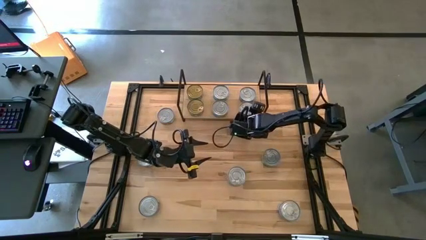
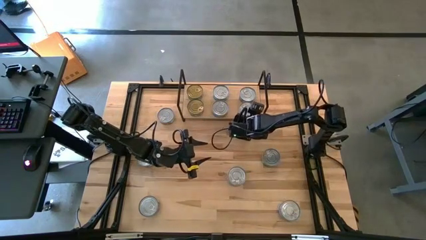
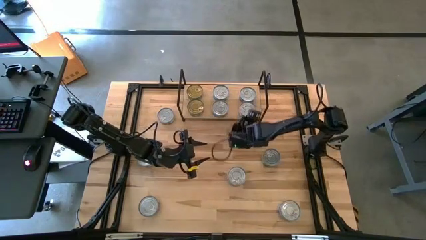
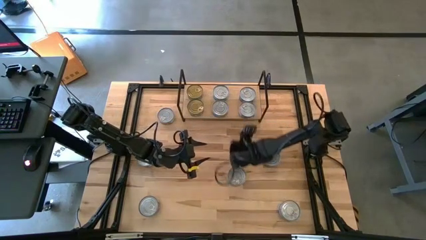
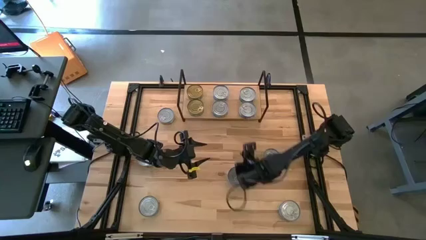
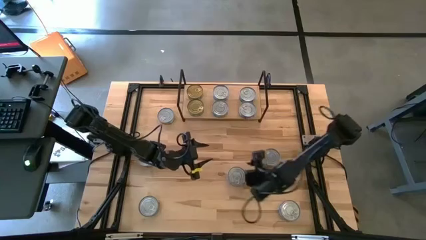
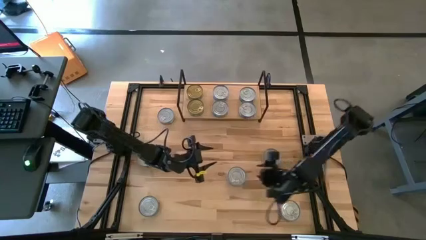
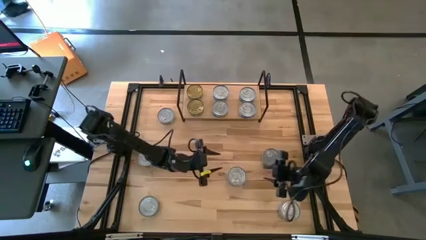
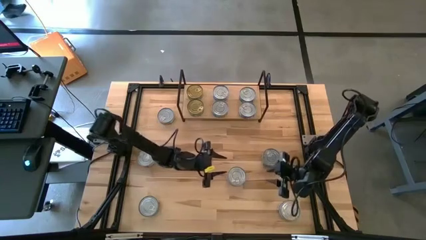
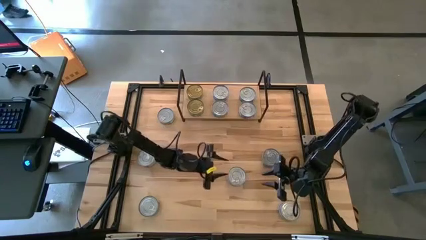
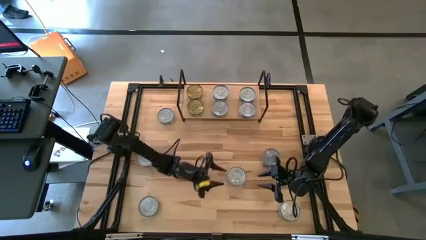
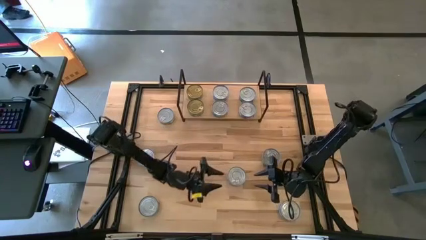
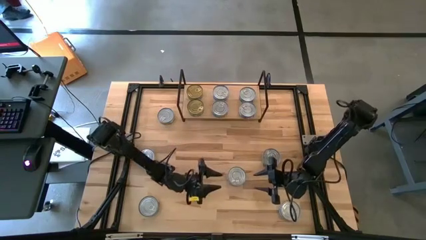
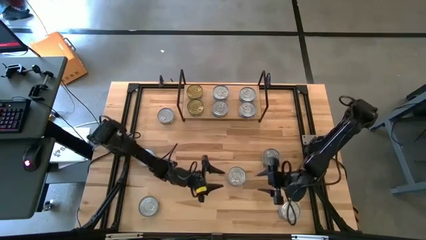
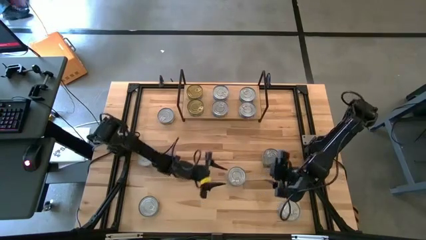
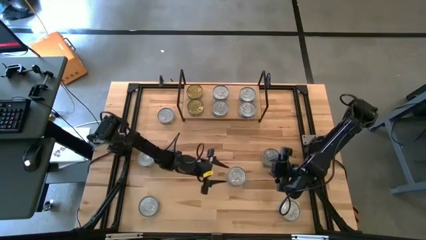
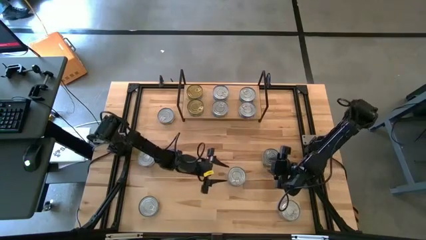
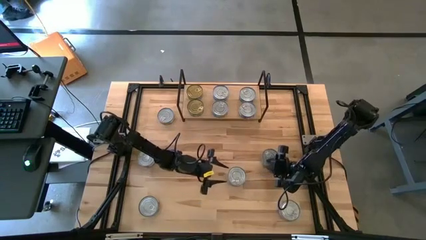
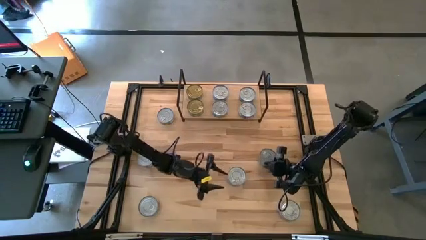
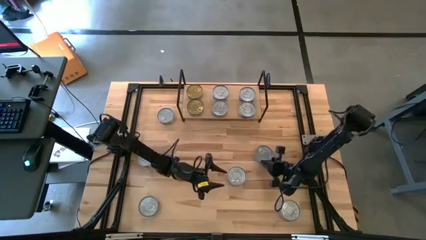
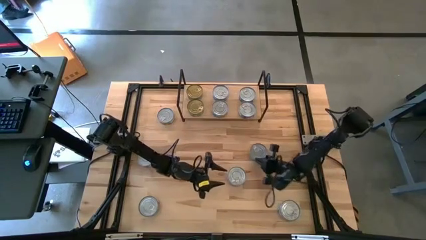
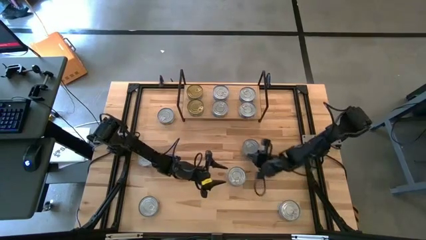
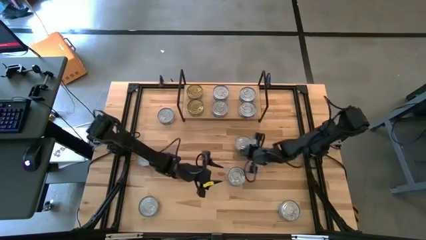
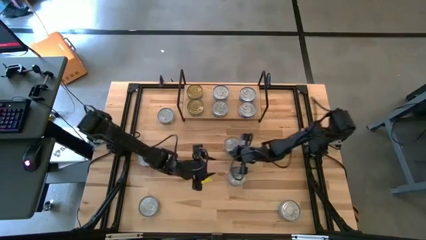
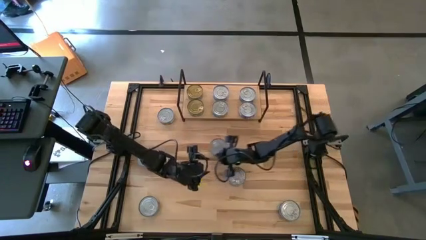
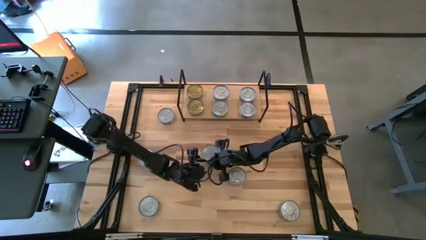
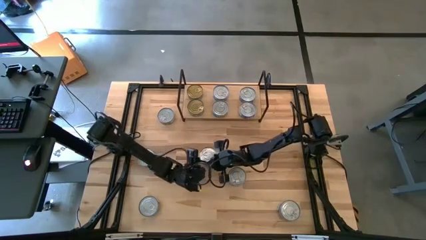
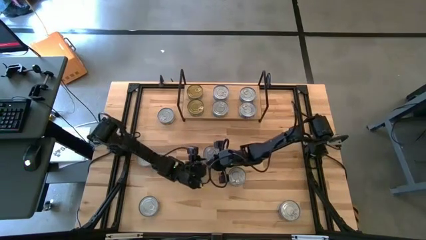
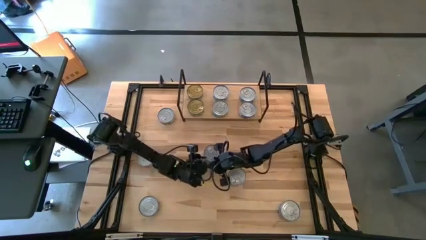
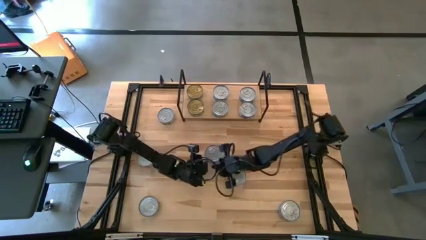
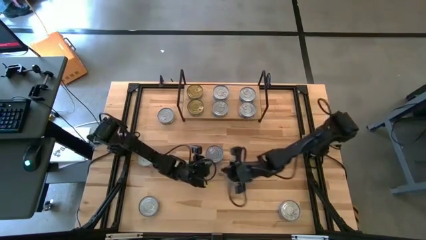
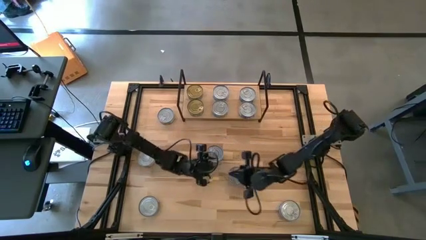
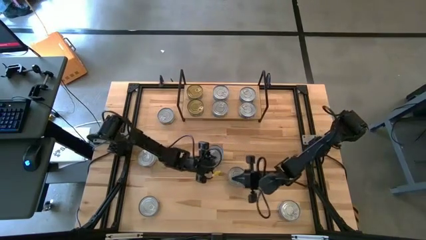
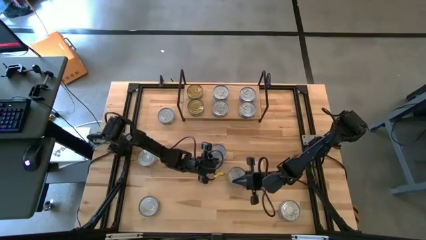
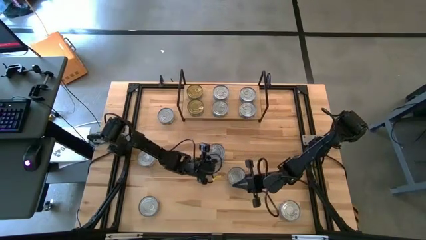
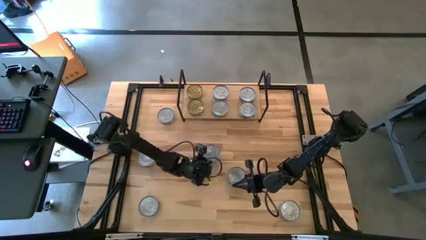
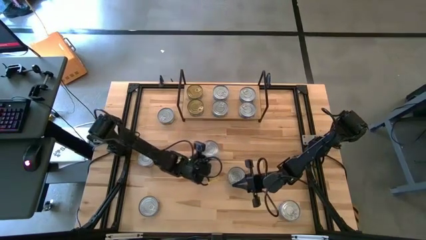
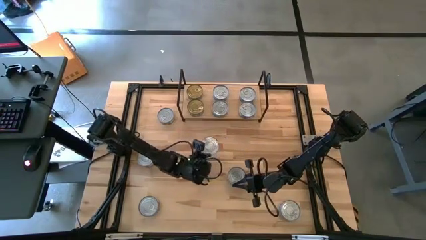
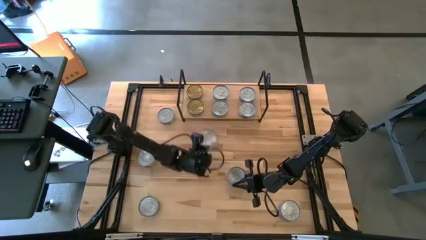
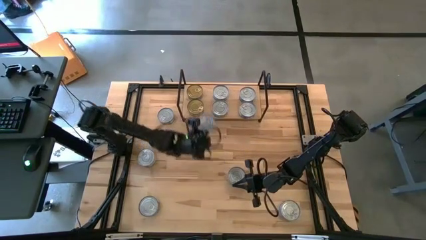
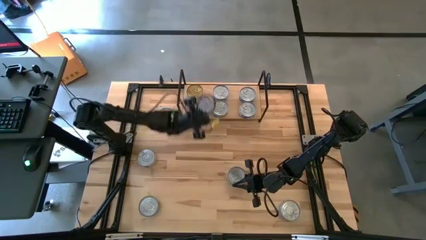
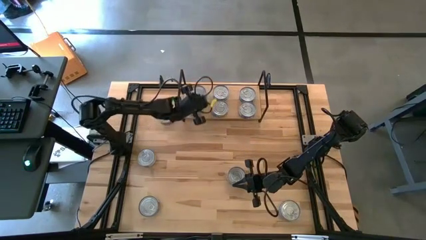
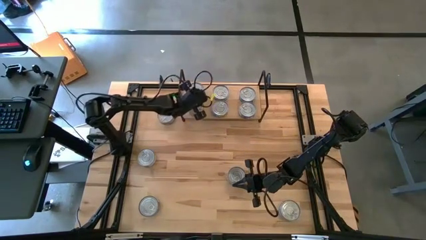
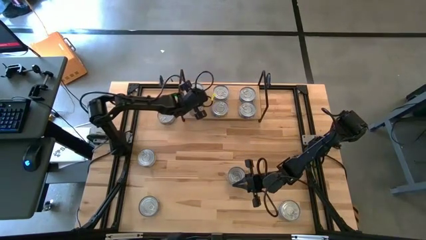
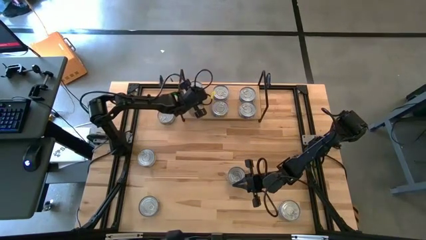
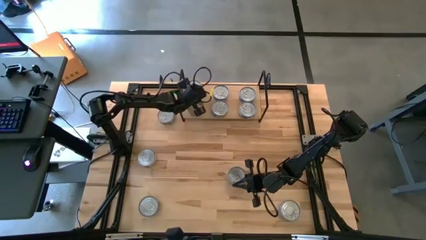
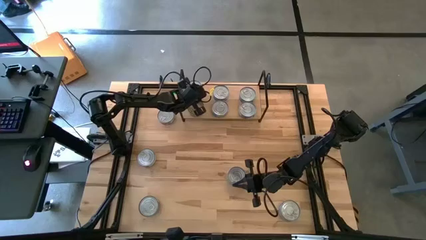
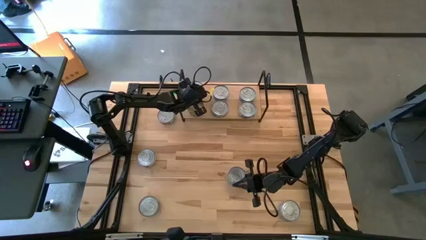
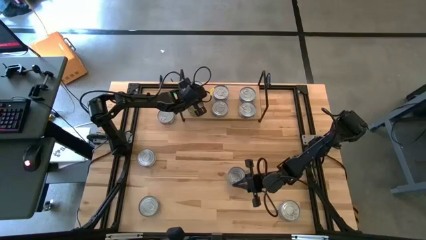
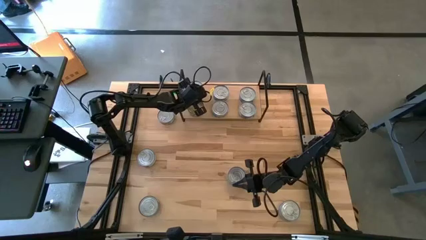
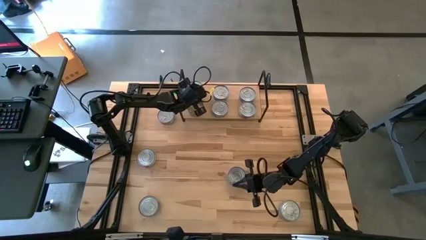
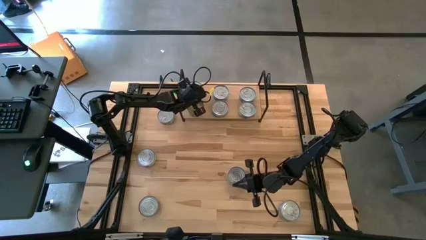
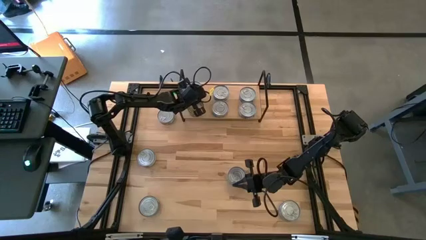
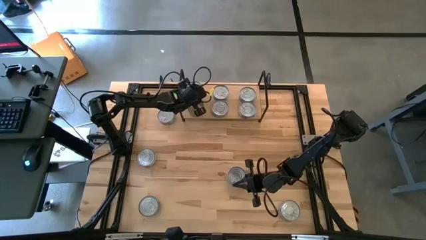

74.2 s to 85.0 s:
Task: Stack canned seafood by type on shelf
Stack the green tuna can on top of the other green tuna can on the shelf
